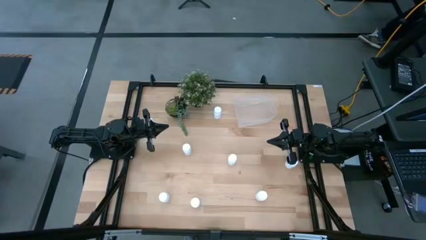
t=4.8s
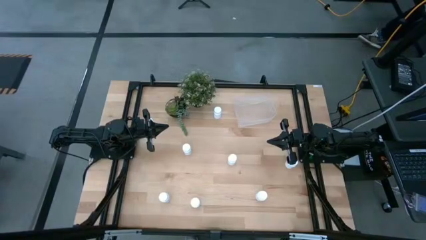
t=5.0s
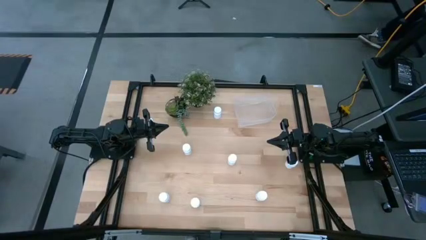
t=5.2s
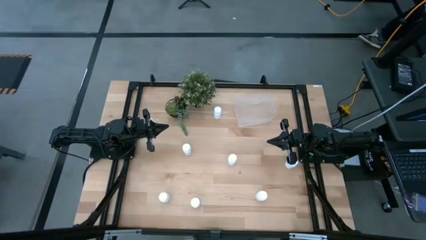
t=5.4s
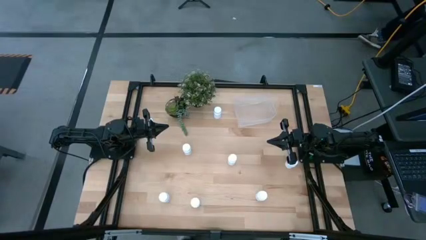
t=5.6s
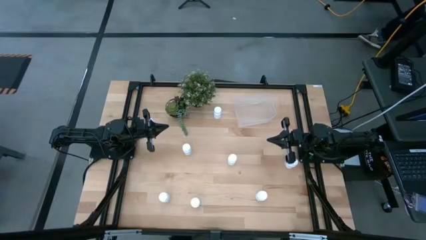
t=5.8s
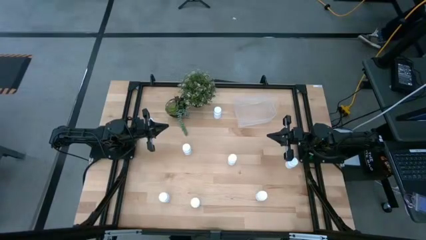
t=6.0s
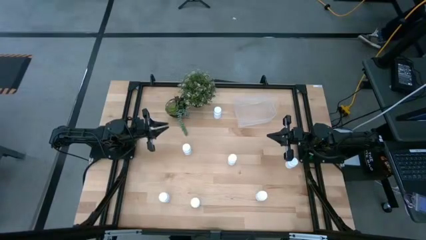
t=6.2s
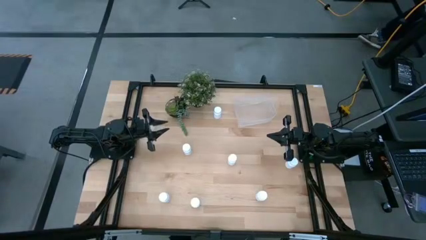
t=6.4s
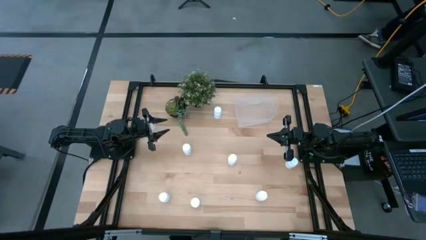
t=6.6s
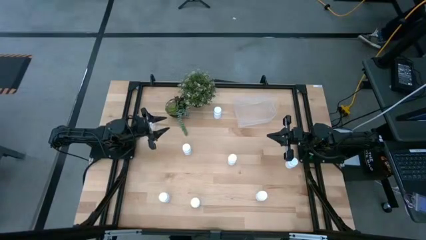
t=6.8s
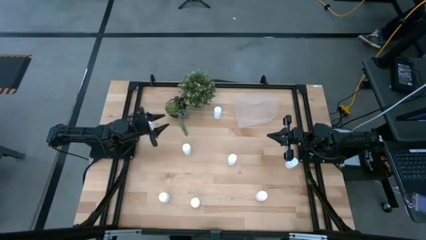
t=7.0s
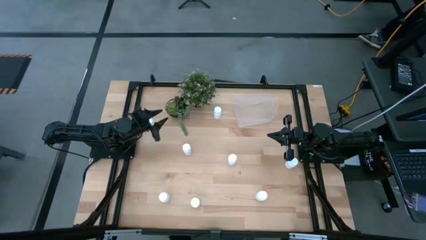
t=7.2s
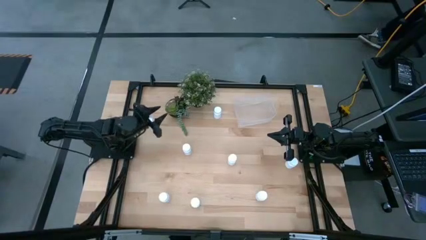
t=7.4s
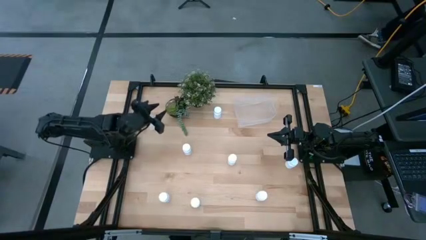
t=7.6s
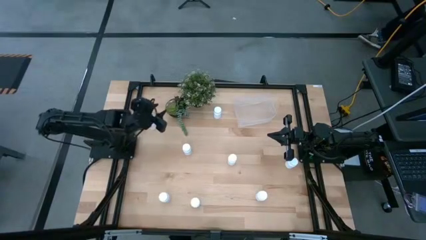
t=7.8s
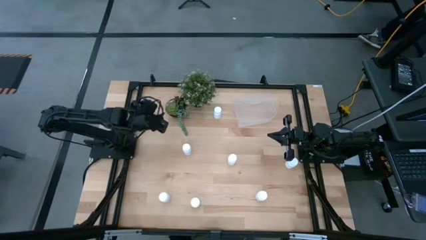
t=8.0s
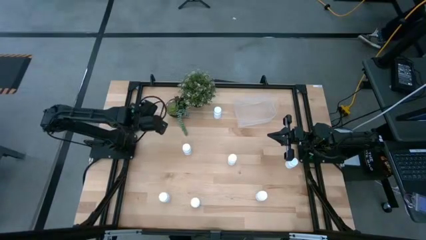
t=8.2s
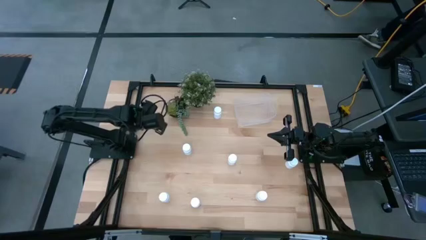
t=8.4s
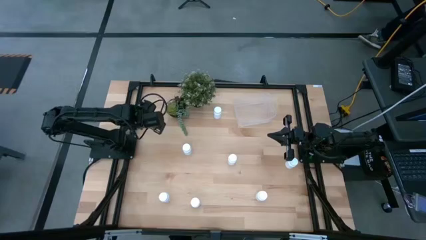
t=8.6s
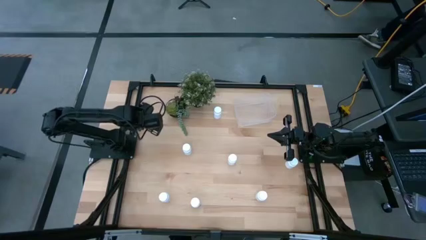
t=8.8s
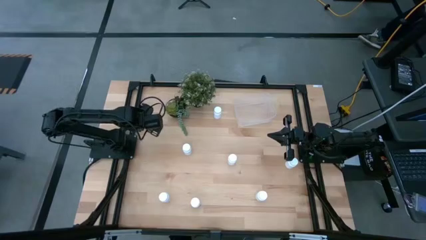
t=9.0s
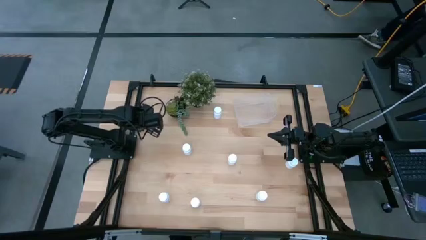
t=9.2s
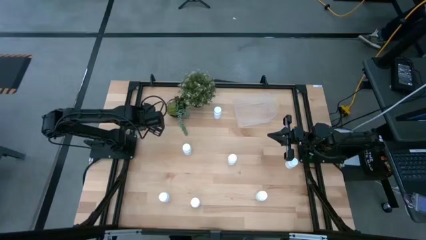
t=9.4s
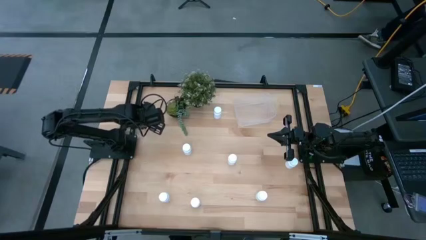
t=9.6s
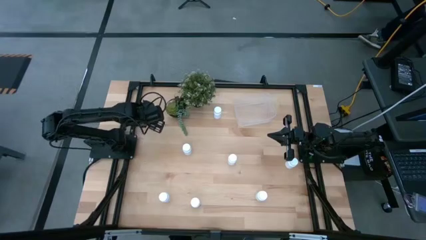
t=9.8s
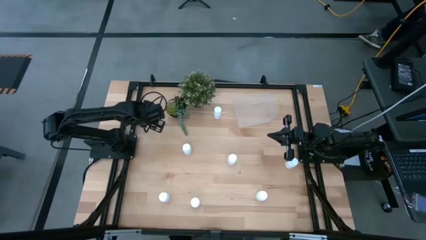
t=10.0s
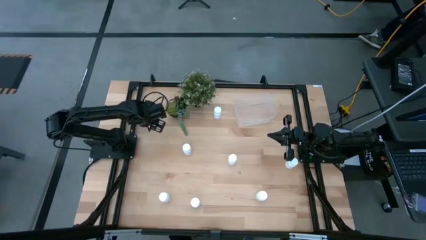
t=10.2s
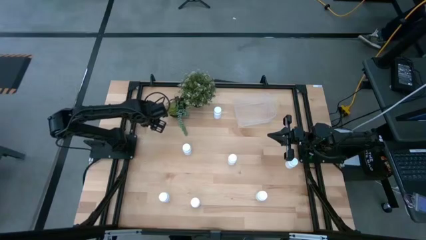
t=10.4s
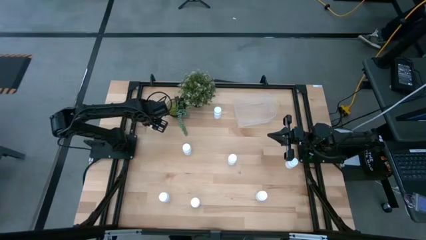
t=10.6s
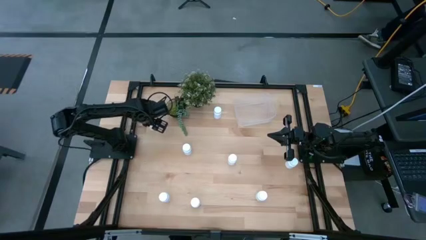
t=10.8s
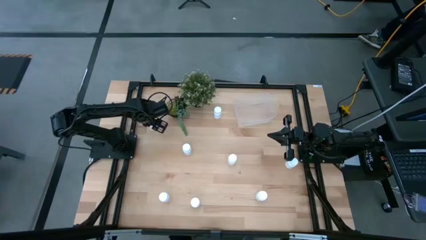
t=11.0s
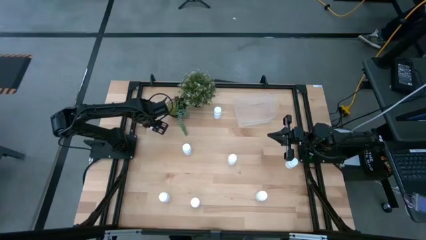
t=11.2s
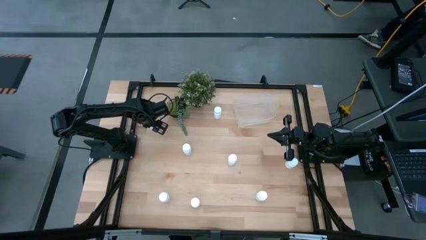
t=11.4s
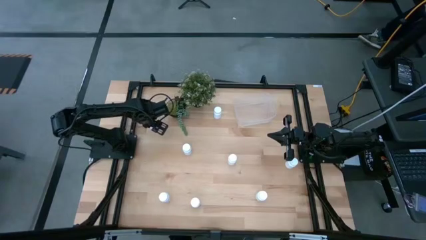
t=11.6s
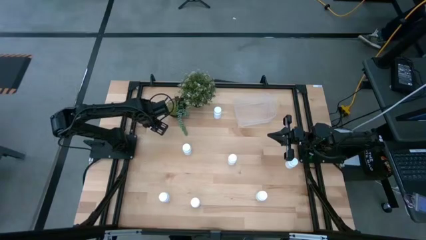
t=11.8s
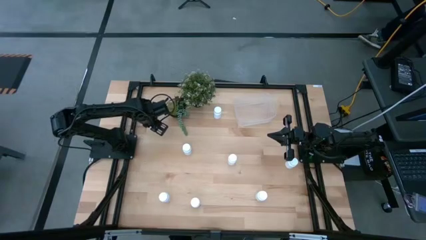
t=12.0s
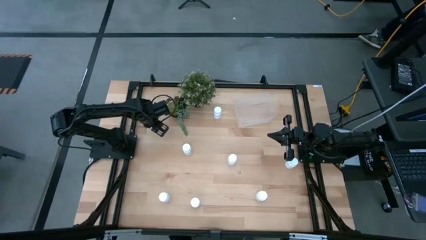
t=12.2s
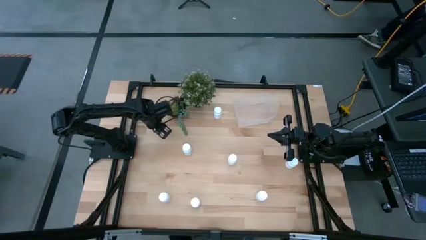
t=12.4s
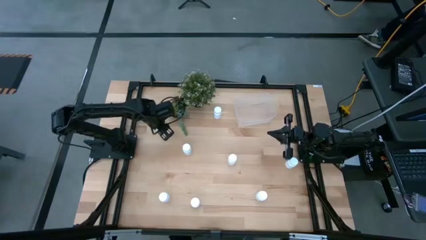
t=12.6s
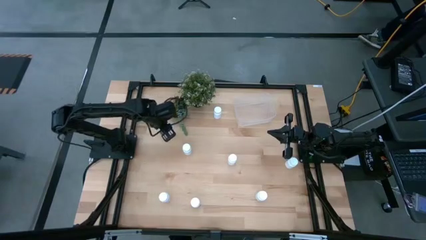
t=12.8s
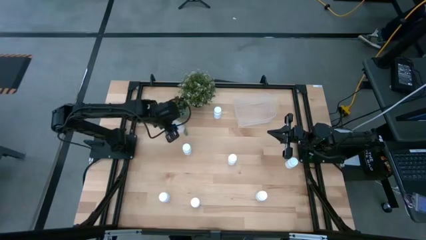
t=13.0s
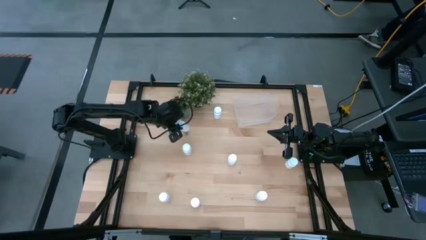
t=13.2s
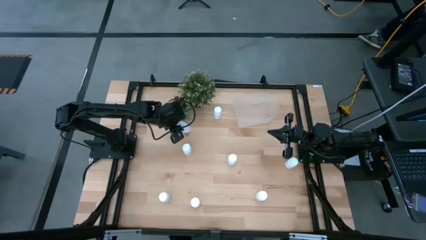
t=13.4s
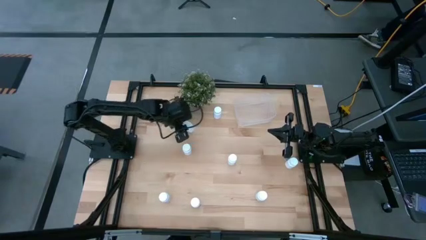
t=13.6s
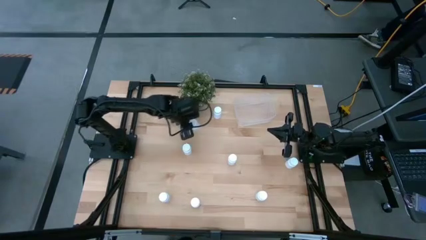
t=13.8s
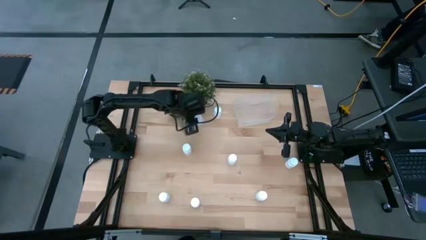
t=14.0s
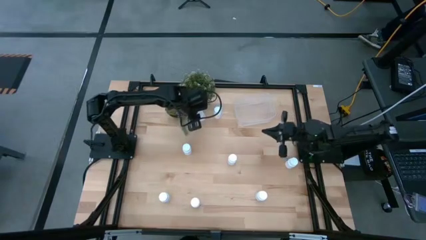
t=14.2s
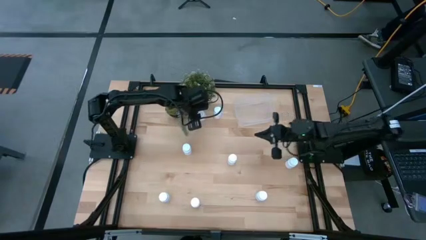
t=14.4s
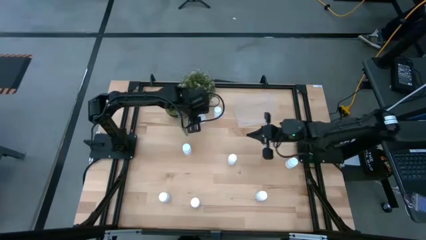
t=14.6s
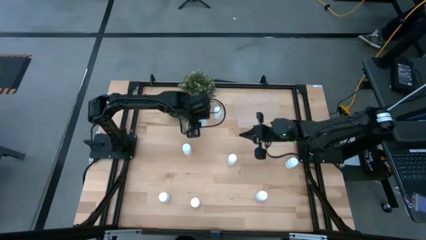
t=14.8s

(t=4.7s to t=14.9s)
Task: Pick and place pill bottles into a basket
Put the white pill bottle into the transparent bin

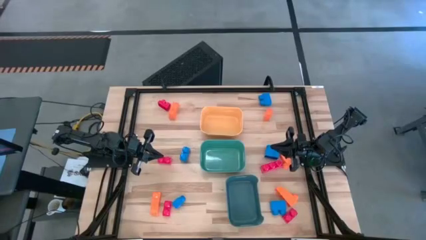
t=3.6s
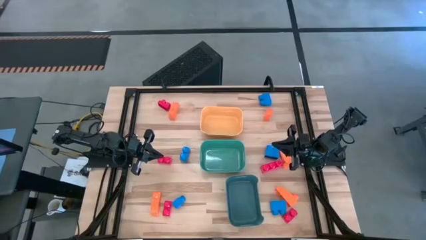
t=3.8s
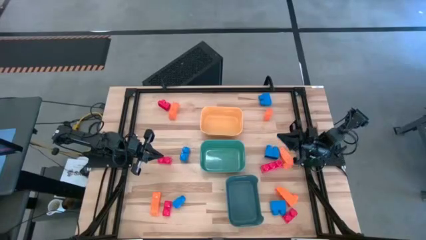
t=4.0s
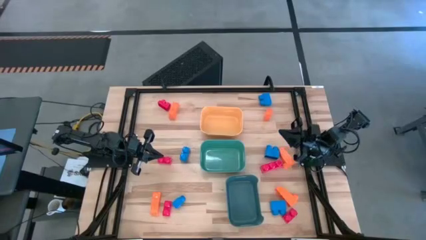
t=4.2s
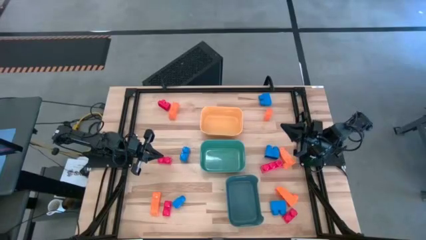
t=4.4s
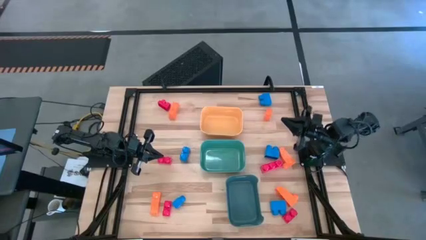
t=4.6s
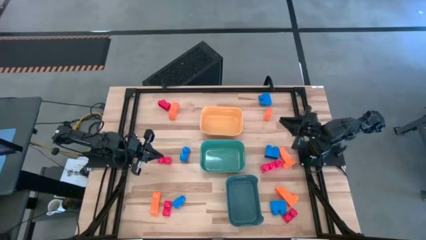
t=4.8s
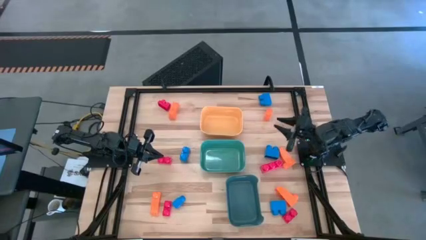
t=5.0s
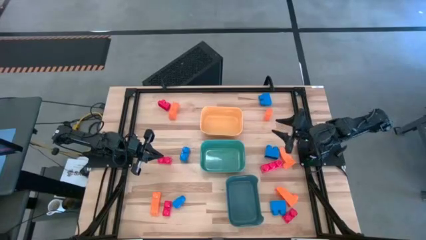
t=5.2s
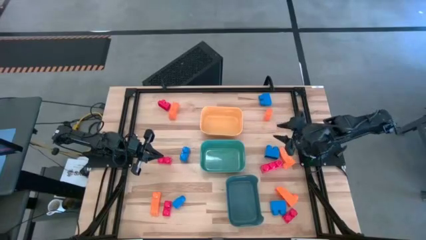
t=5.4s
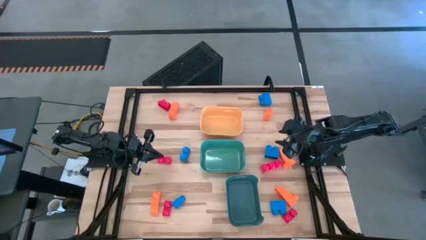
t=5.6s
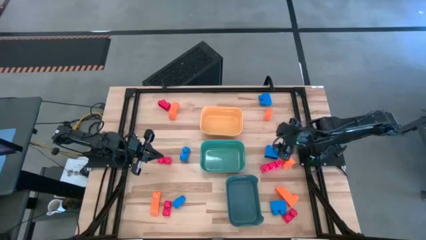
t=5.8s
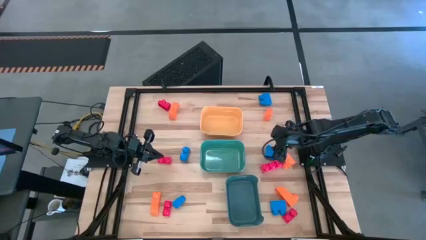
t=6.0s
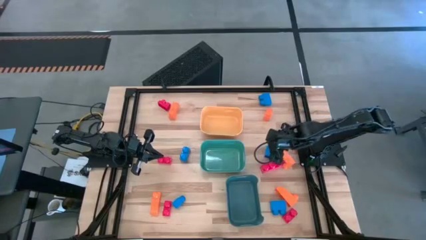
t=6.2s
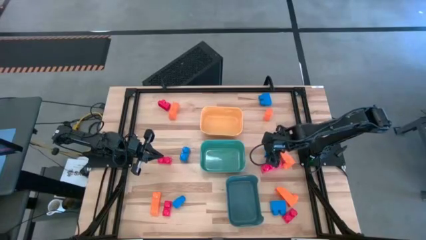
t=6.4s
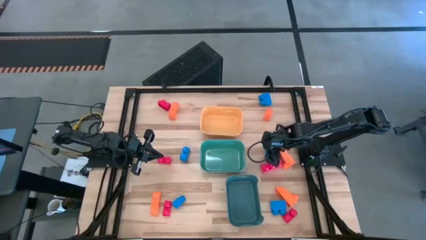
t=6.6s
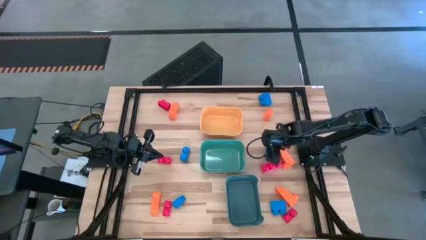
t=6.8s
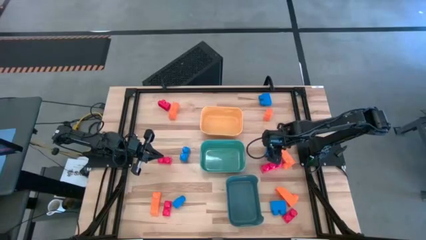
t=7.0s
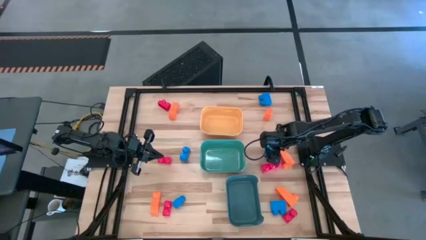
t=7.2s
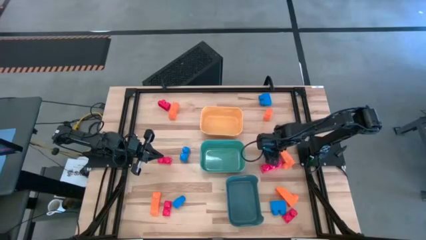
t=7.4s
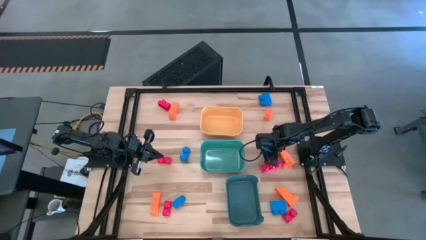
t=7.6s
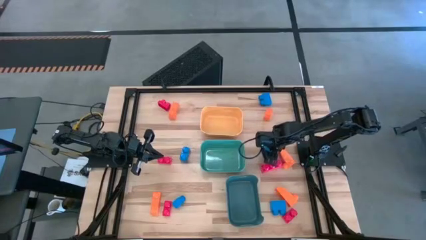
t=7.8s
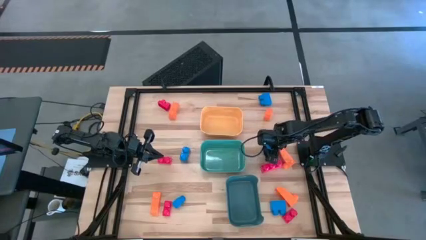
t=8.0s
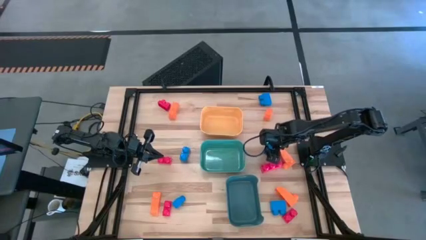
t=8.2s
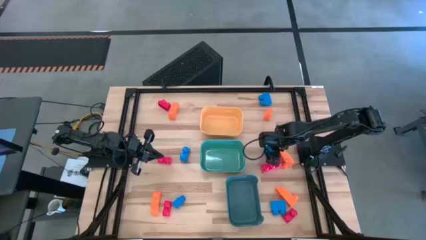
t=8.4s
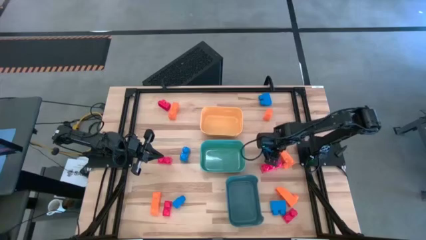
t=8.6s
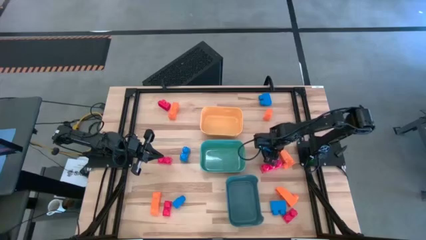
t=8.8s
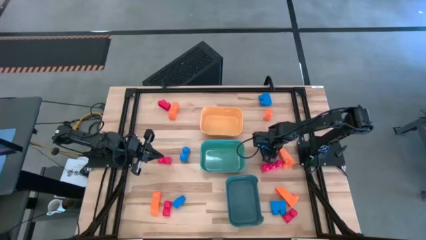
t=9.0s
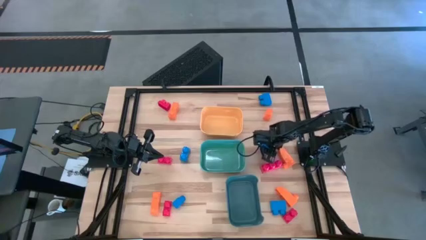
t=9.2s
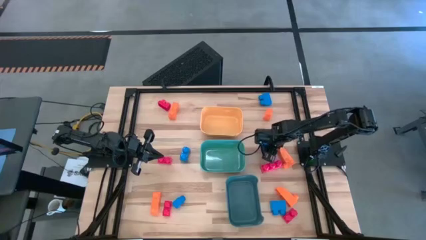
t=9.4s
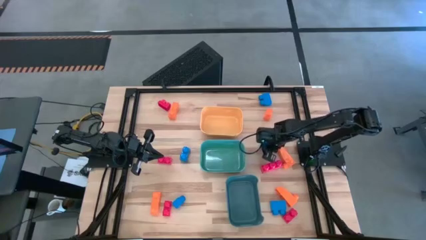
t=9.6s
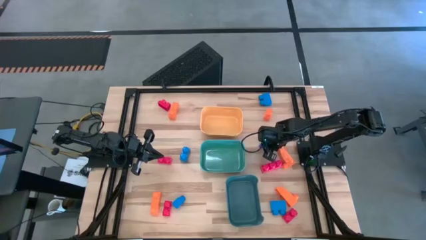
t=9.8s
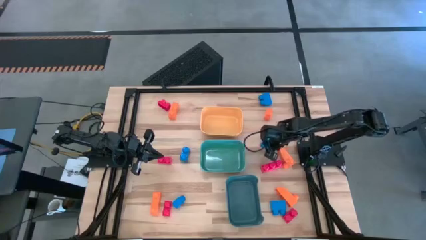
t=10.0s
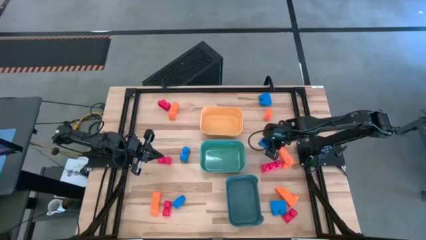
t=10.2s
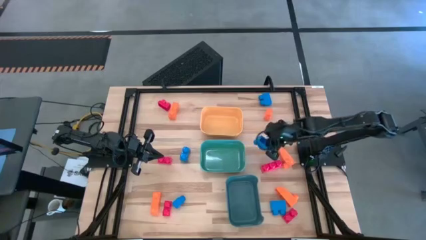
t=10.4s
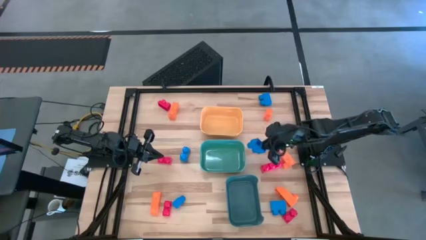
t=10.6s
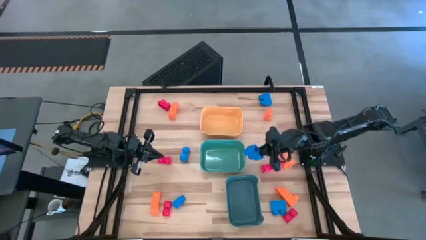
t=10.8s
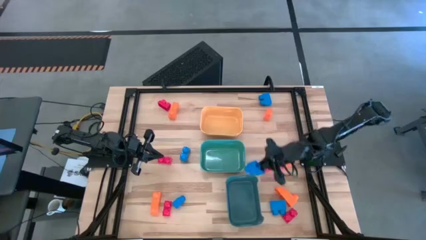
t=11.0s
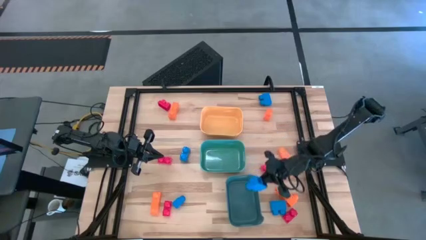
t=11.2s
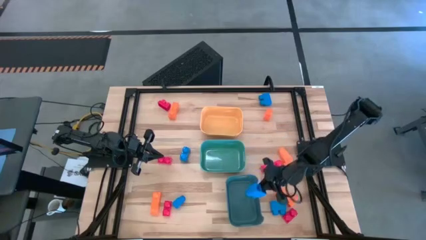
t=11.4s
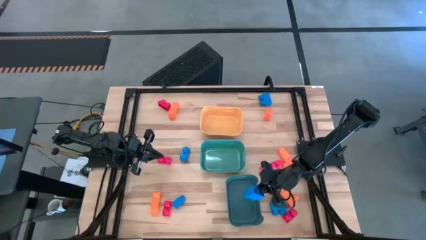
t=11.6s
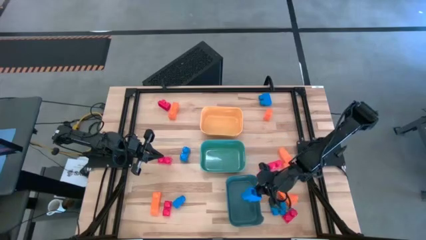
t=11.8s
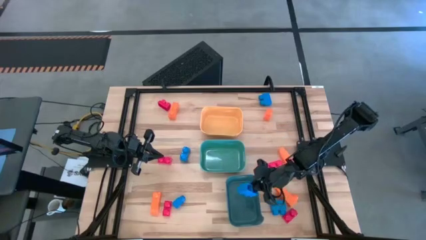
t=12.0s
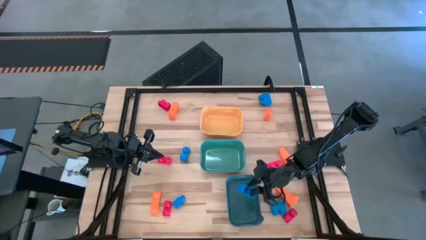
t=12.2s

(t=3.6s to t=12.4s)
Task: Sort & place blocks by color
Put the blue game piece into the blue bin
